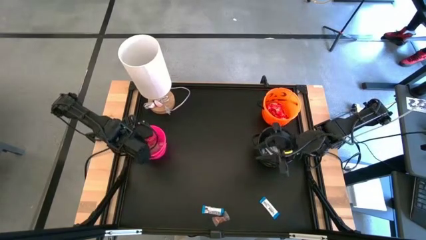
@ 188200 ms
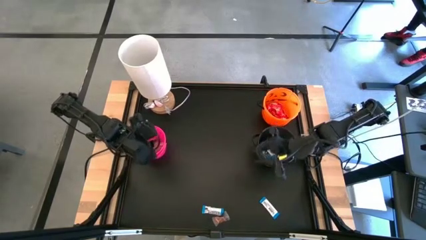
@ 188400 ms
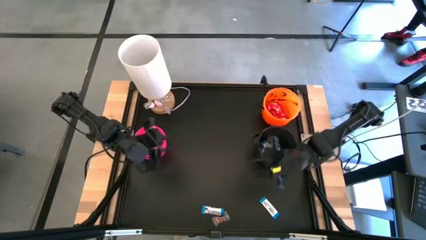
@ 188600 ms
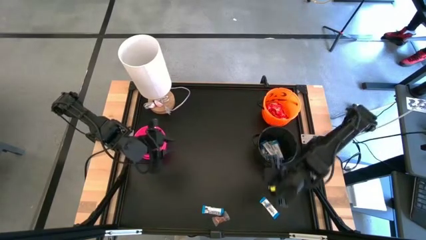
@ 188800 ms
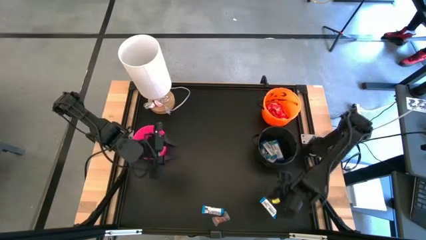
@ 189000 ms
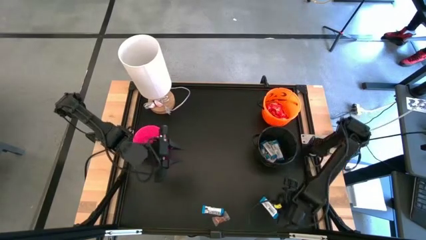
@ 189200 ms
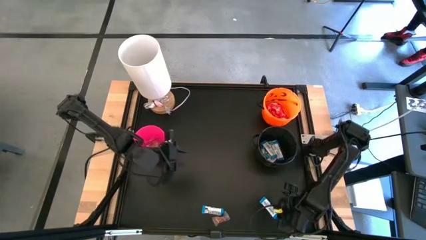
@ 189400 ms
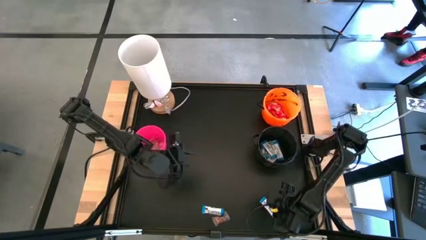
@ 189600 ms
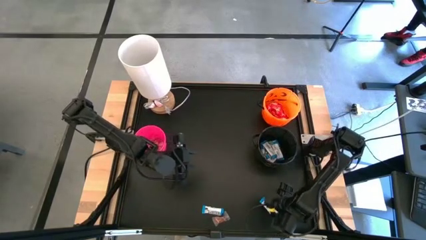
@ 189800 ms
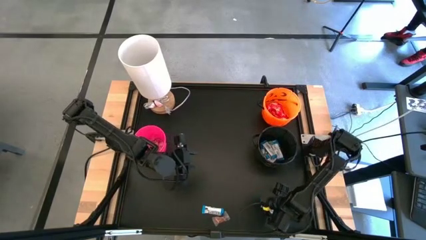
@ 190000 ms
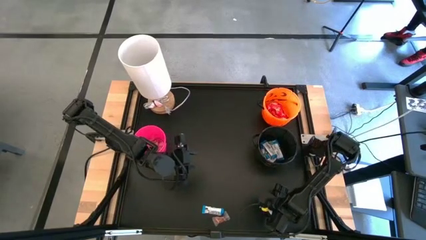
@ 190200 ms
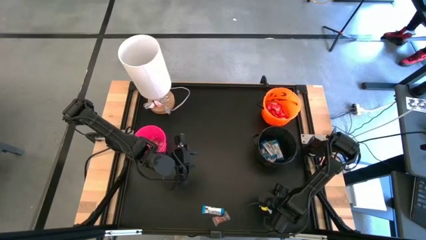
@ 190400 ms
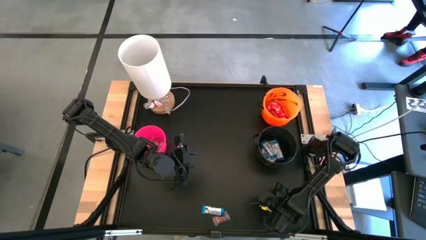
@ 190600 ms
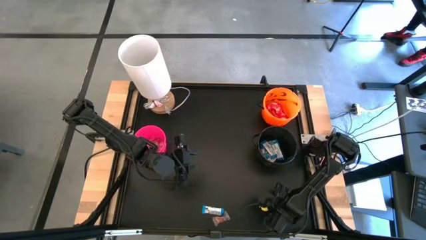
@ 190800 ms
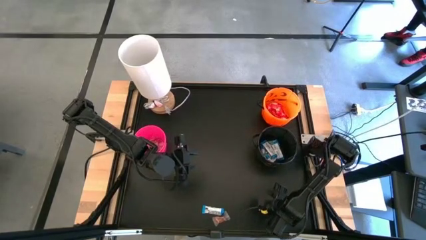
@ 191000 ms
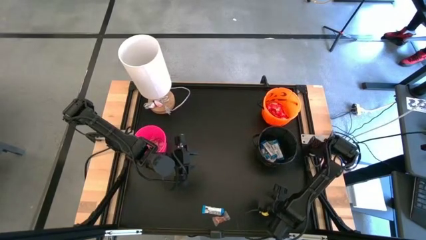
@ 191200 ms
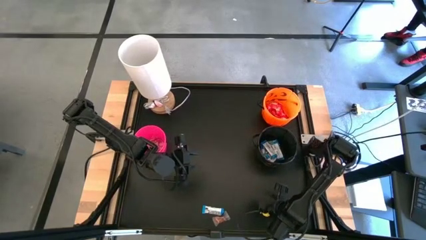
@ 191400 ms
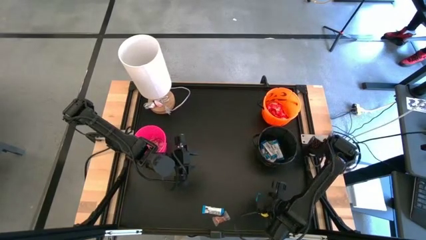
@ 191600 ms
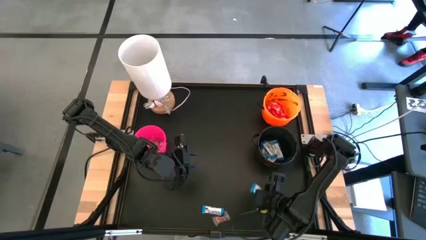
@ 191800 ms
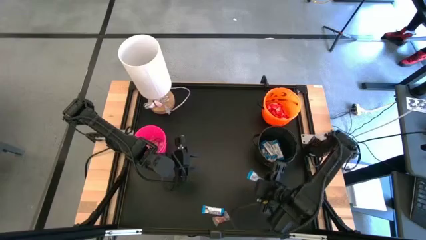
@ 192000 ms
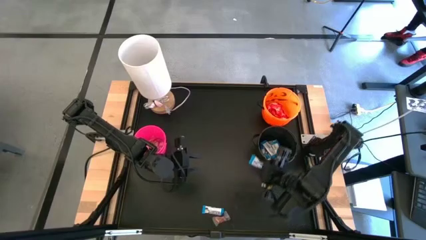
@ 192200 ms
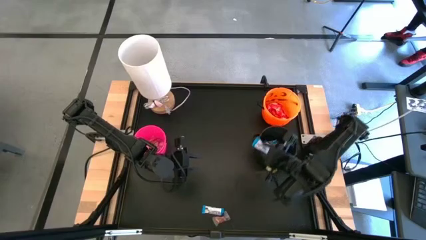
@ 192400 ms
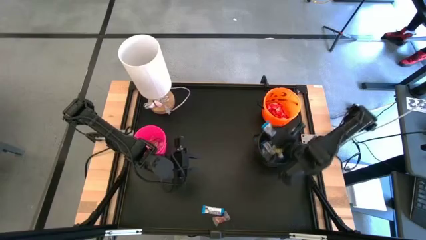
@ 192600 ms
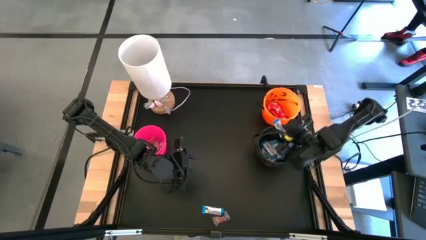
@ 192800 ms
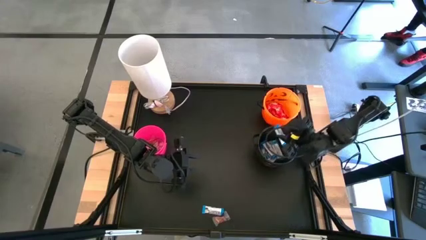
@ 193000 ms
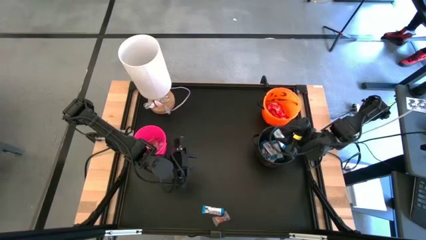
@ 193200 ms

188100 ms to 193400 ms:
Task: Sort candy
Put the white chocolate into the black bucket

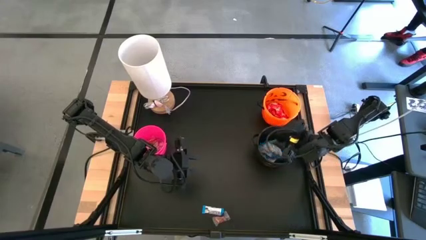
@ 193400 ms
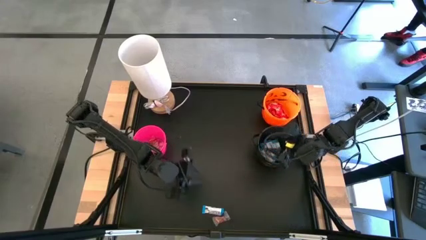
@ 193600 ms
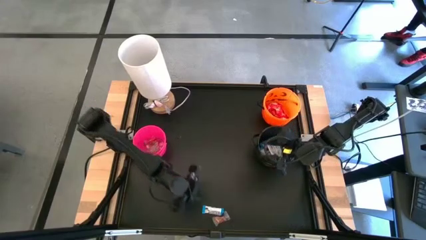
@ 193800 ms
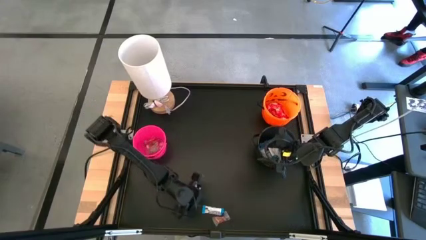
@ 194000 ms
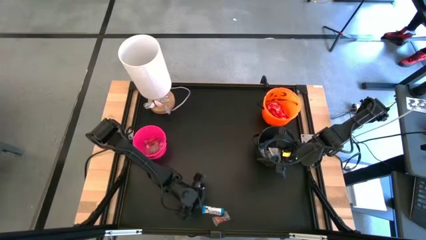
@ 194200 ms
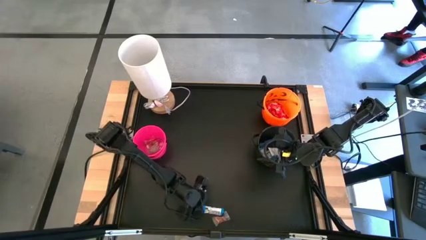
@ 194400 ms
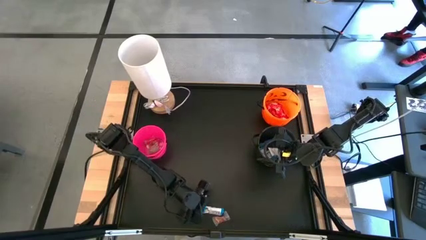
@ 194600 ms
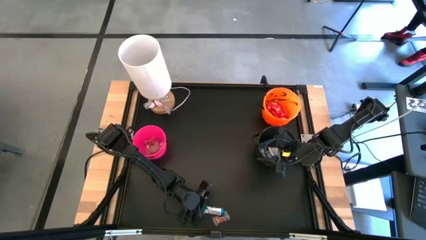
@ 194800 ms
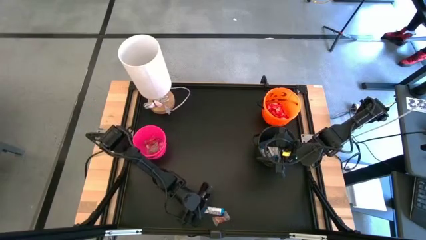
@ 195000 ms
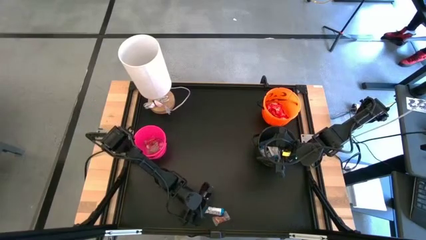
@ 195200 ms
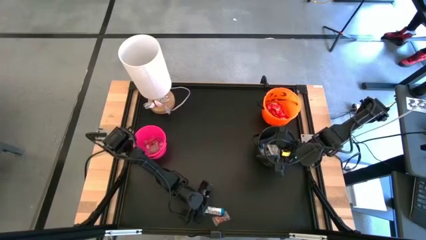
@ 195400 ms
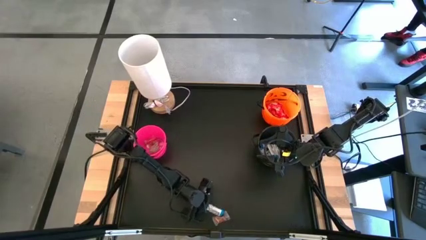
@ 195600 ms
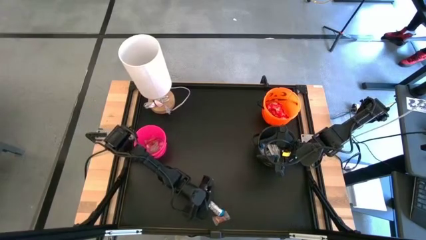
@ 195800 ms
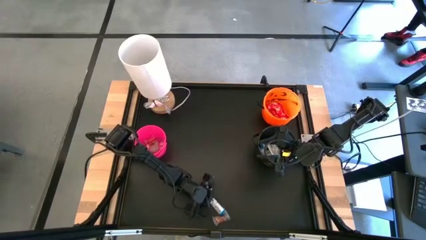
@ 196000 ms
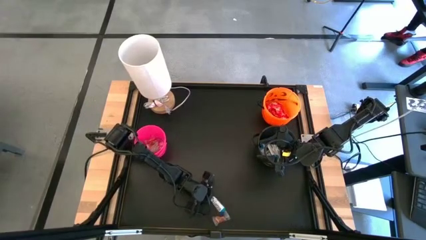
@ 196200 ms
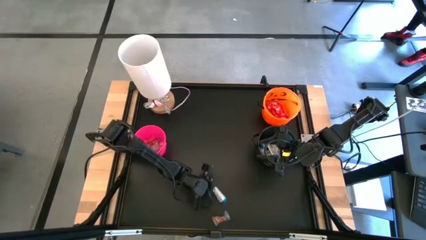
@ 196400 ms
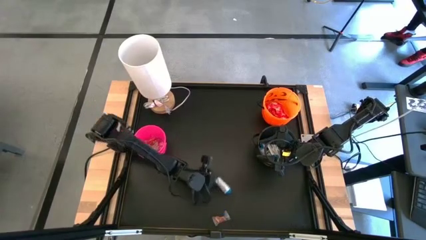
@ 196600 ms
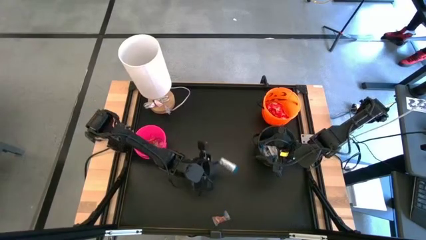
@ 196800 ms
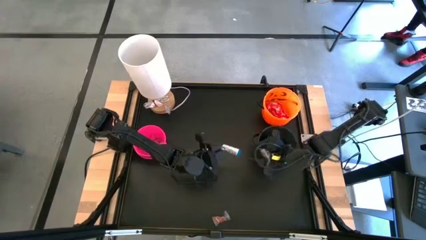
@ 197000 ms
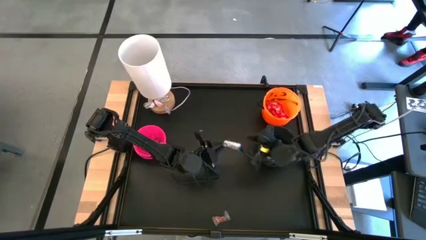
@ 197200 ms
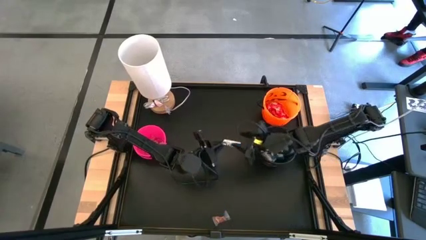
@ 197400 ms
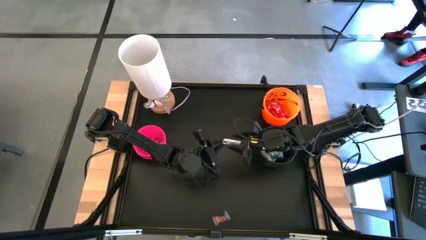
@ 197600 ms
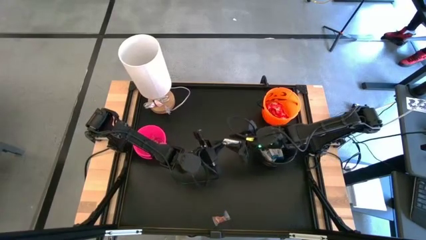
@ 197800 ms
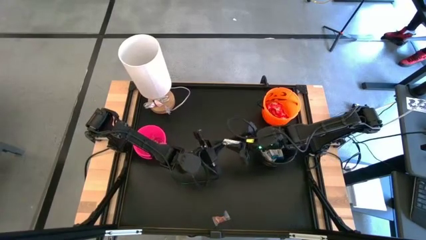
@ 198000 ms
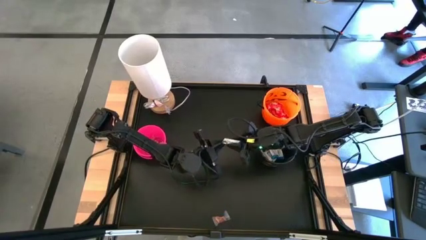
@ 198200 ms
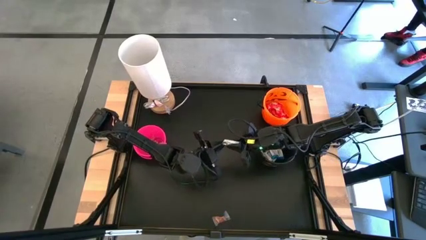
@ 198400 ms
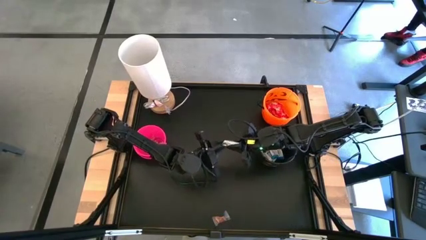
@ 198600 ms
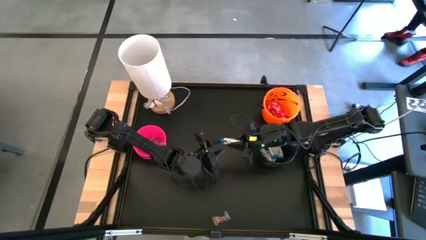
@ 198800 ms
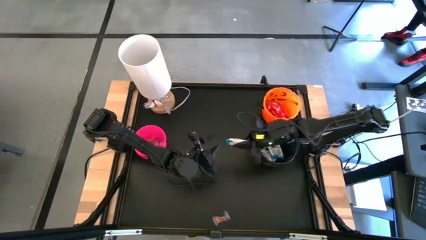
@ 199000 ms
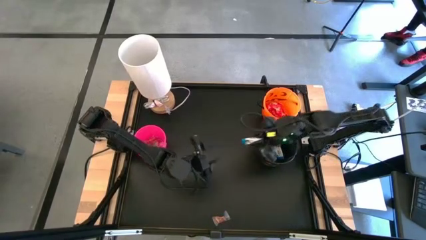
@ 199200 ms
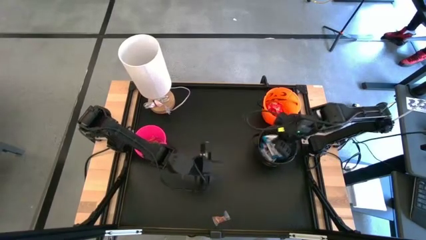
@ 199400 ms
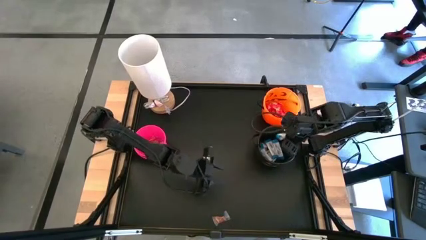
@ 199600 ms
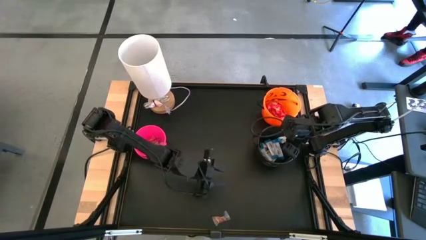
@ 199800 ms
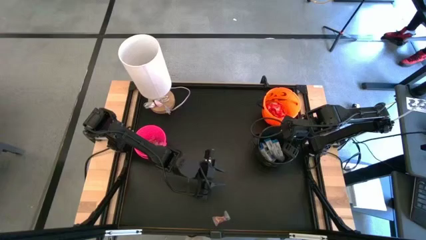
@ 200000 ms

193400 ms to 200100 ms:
Put the white chocolate into the black bucket

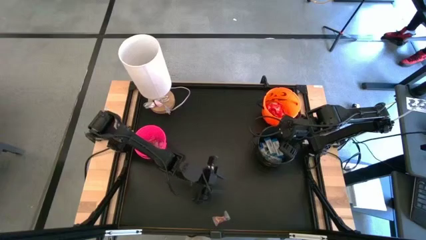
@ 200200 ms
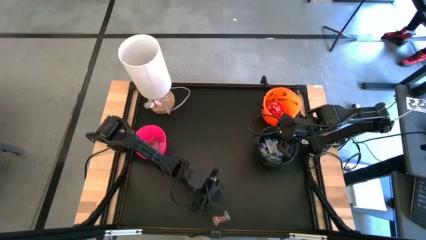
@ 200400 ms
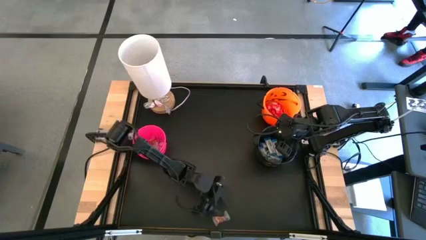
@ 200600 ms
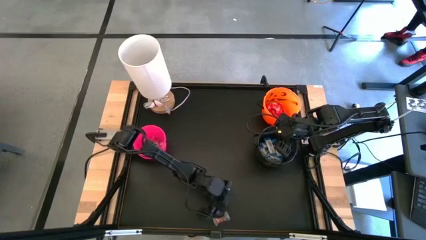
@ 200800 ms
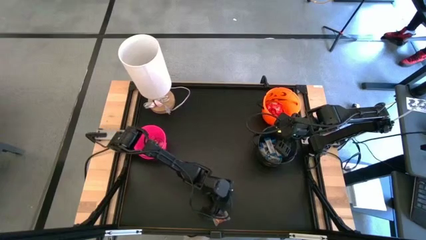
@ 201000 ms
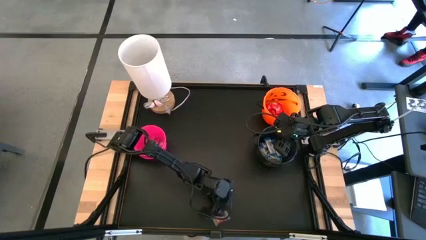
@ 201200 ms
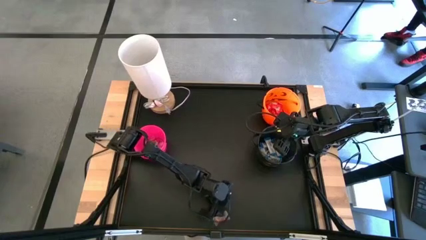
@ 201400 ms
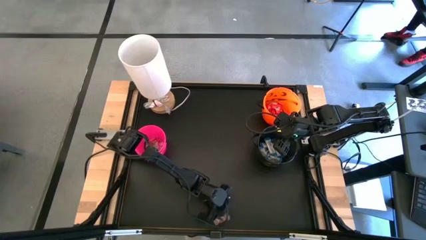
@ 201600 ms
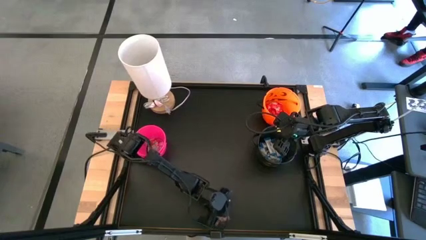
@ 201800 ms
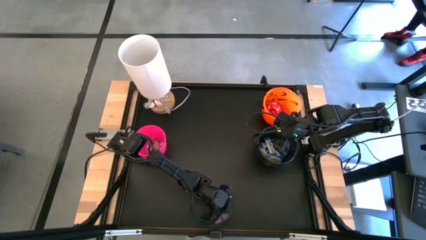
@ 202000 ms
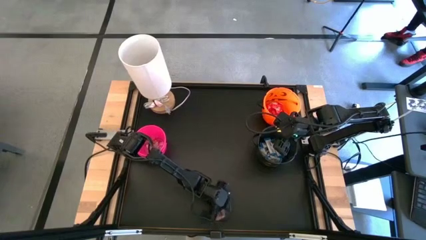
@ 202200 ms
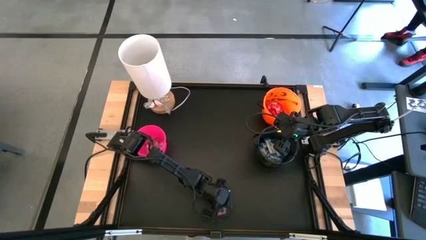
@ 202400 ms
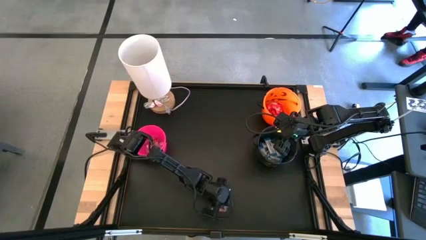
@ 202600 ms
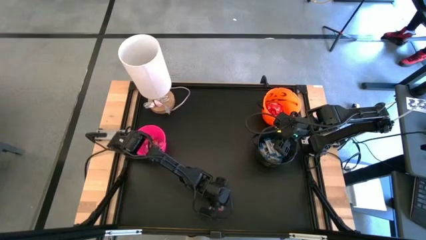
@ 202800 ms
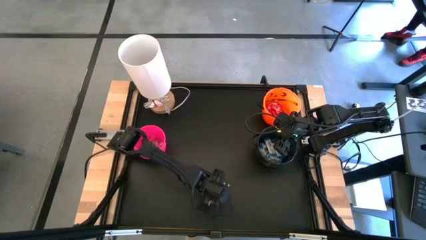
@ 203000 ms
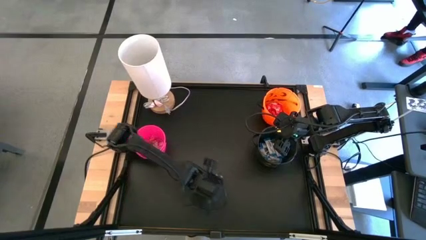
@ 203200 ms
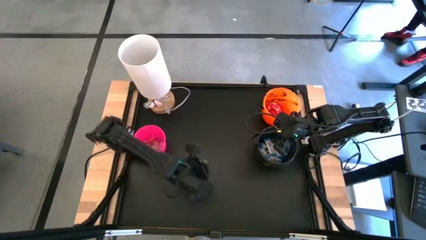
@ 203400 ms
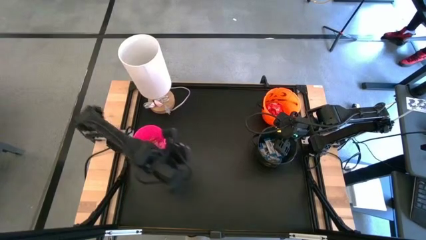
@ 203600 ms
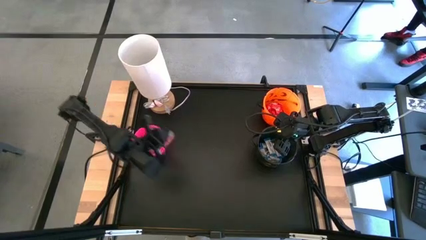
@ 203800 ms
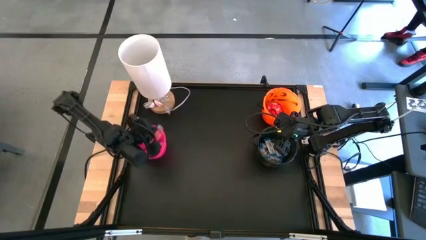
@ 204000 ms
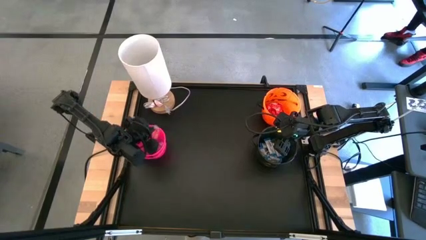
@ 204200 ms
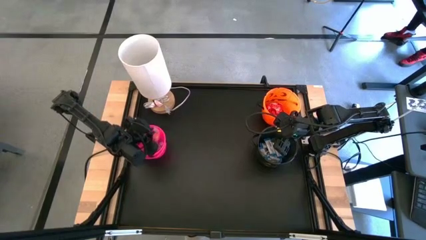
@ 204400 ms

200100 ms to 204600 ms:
Put the orange gummy into the pink bucket

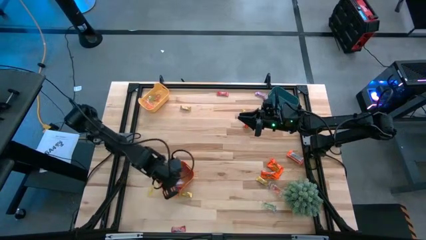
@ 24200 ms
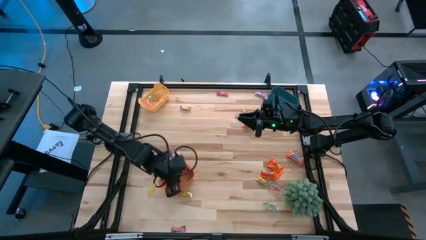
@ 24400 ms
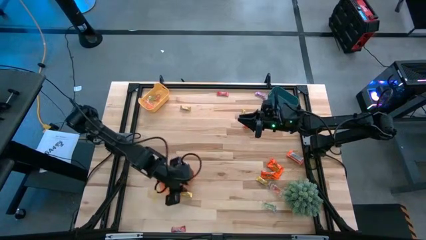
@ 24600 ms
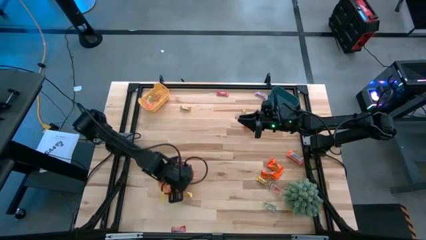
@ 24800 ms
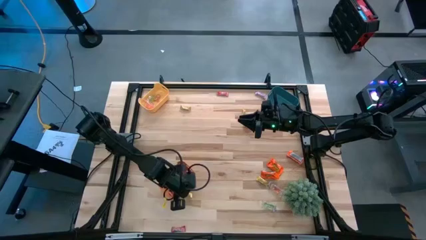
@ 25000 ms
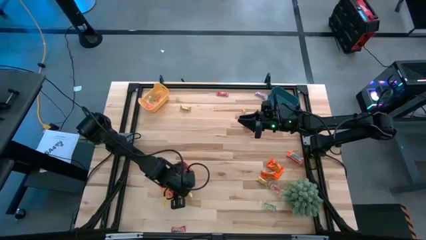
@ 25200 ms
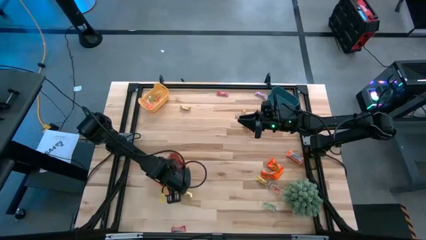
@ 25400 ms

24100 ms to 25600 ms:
Task: Sort candy
Adjust the orange bin
